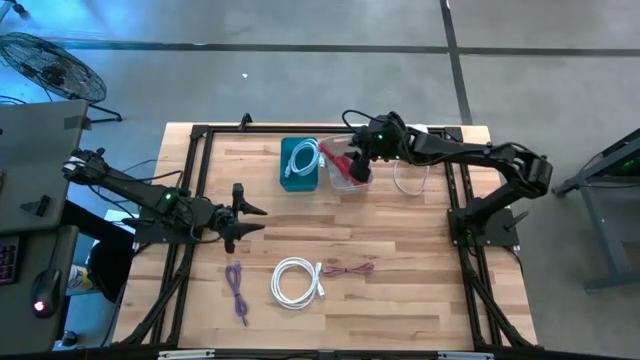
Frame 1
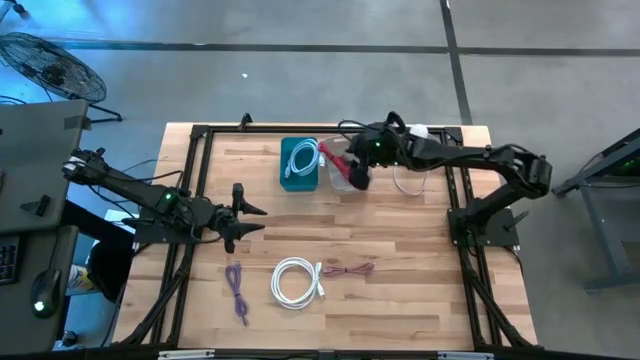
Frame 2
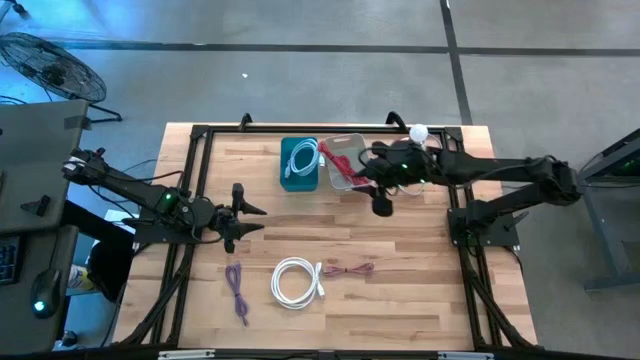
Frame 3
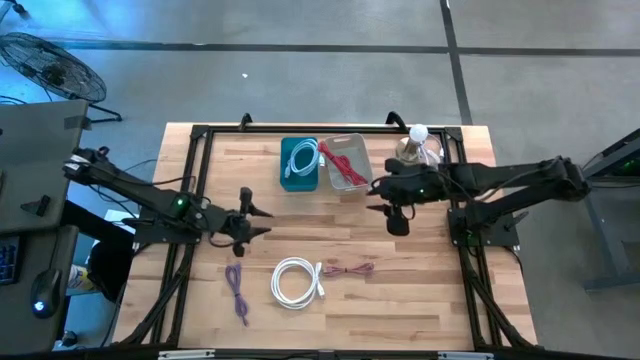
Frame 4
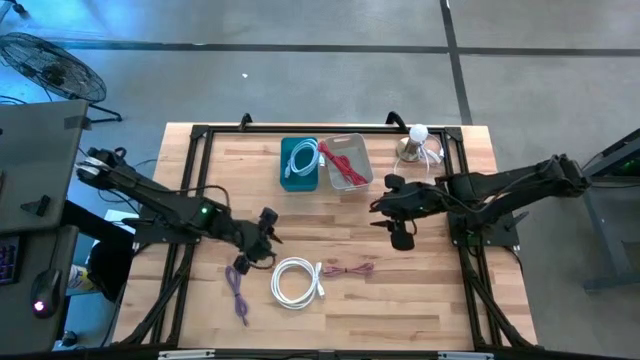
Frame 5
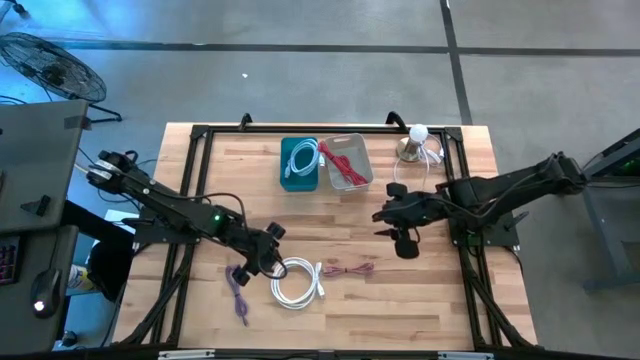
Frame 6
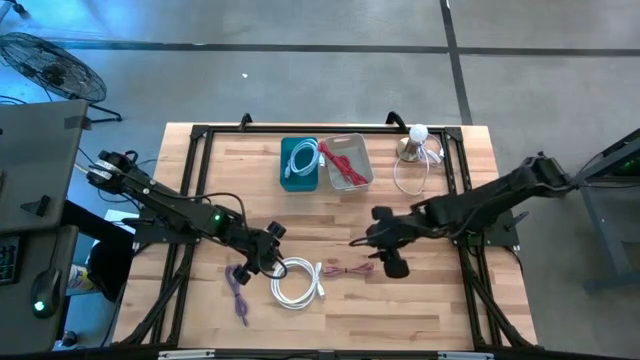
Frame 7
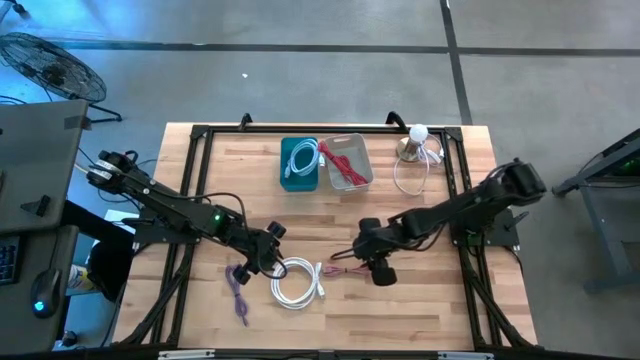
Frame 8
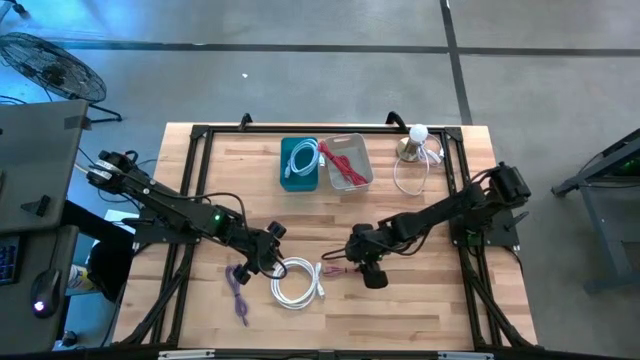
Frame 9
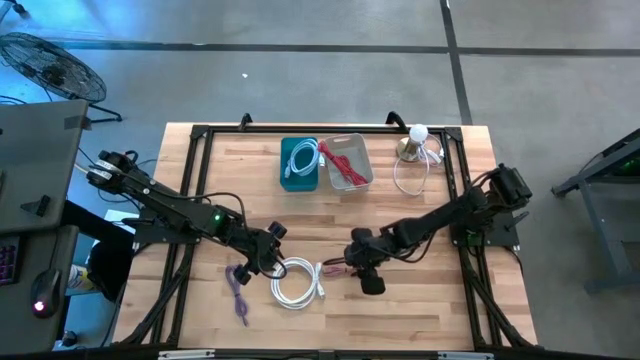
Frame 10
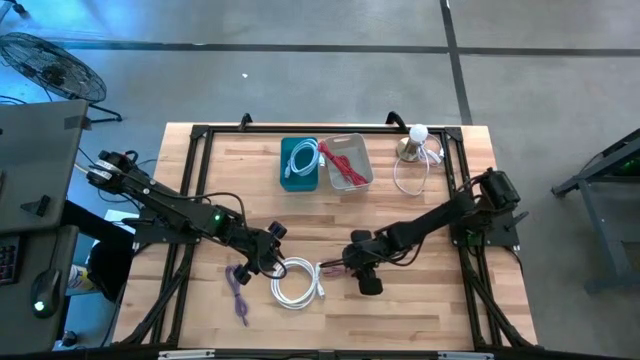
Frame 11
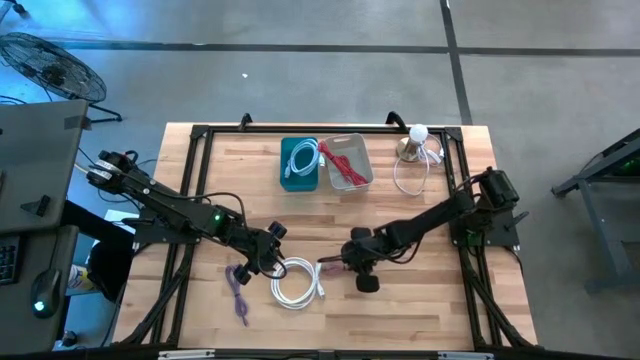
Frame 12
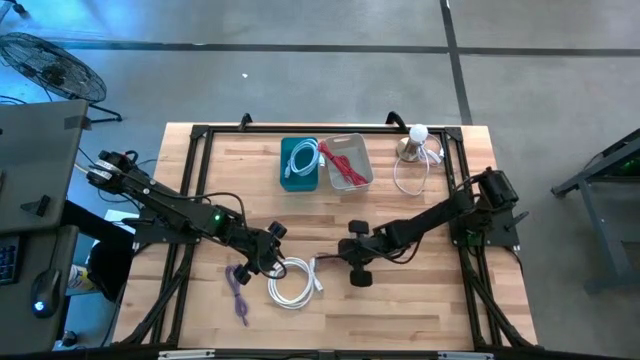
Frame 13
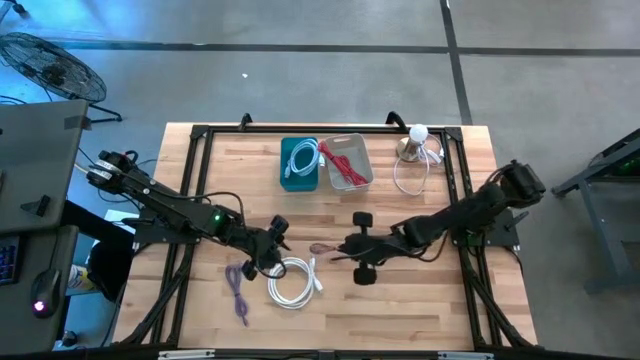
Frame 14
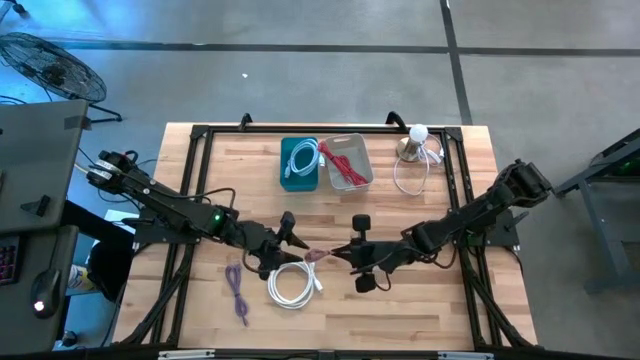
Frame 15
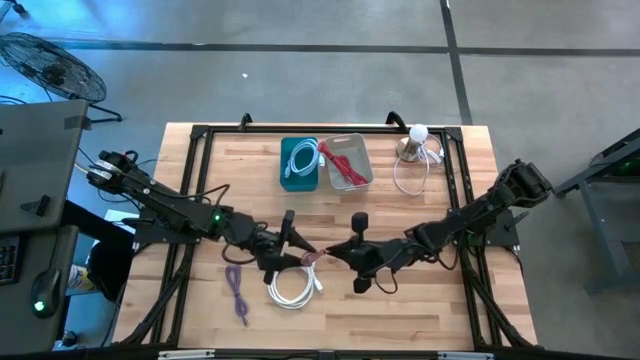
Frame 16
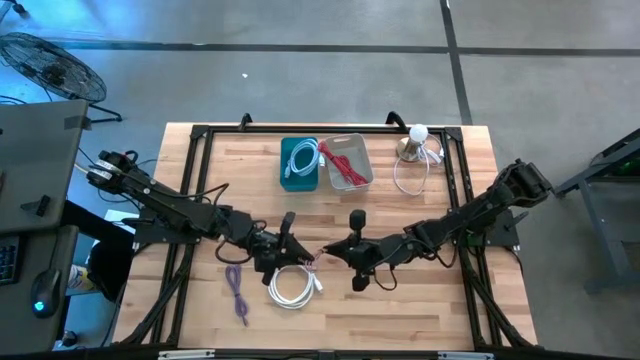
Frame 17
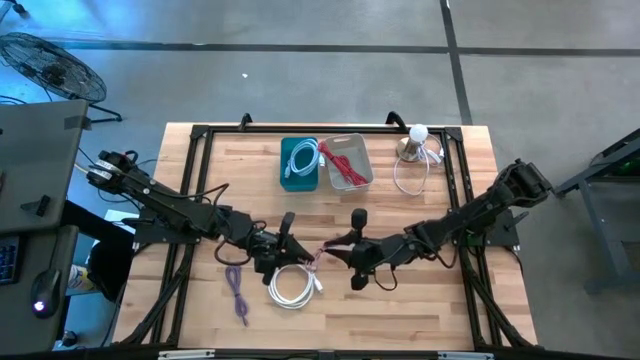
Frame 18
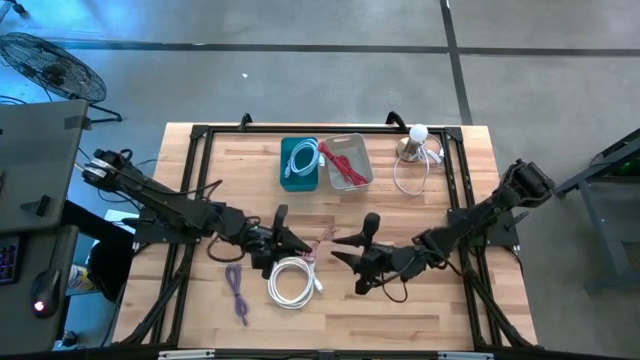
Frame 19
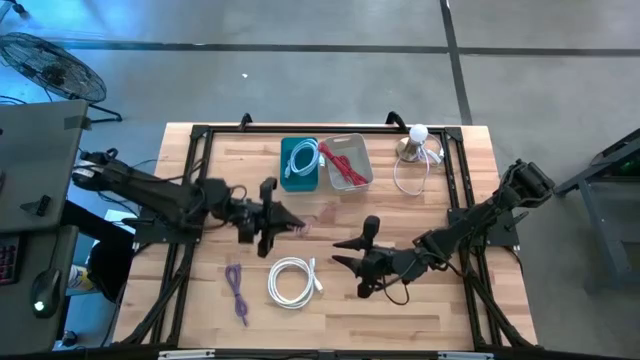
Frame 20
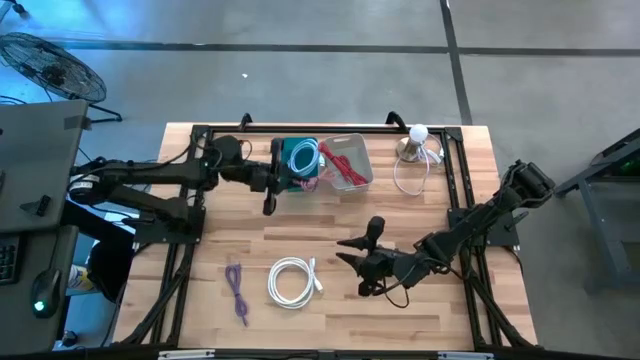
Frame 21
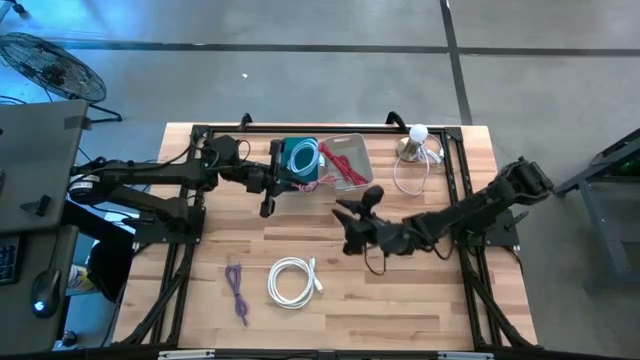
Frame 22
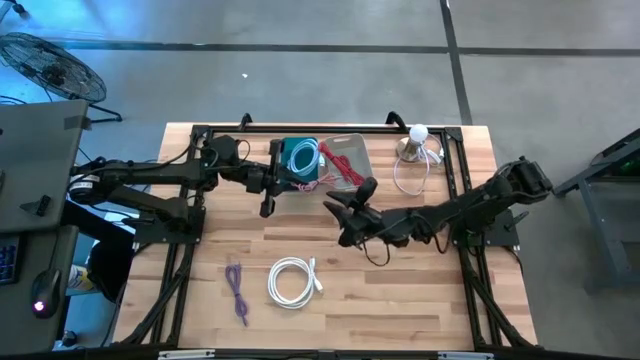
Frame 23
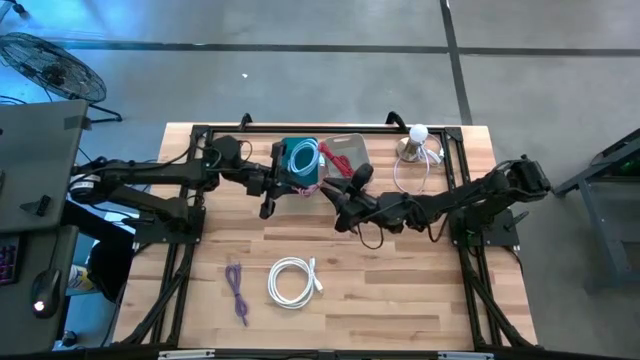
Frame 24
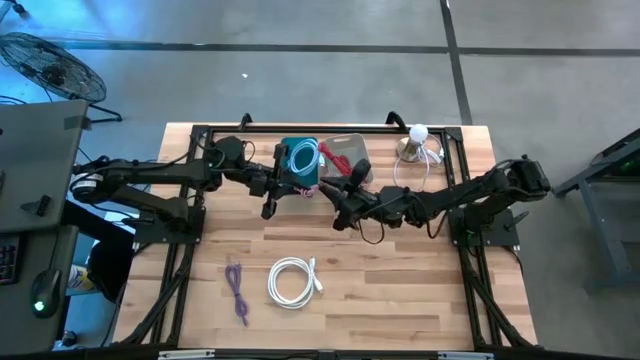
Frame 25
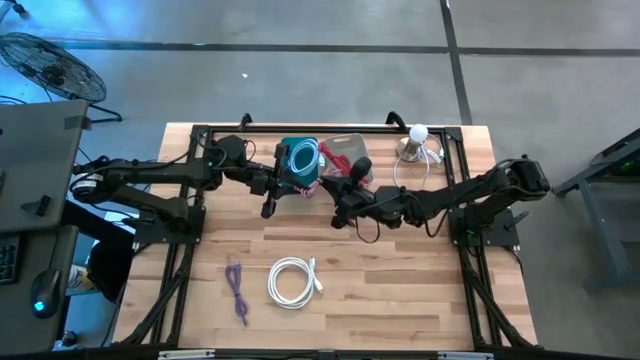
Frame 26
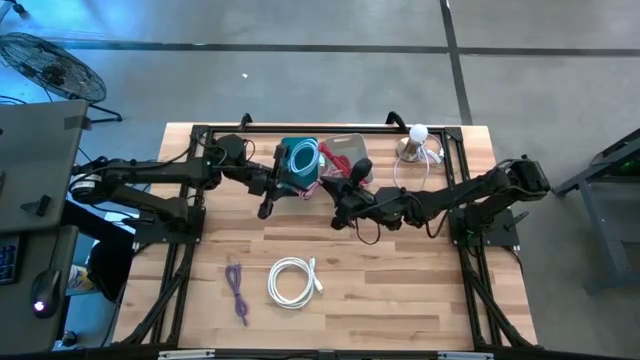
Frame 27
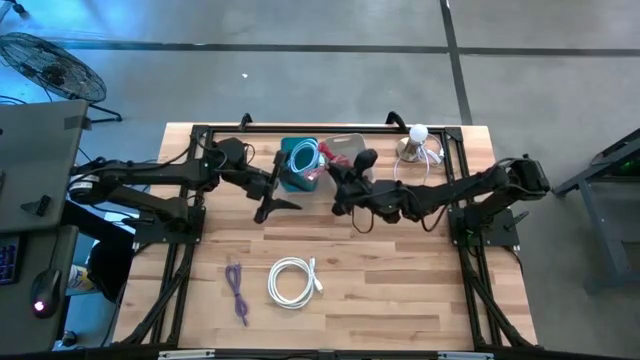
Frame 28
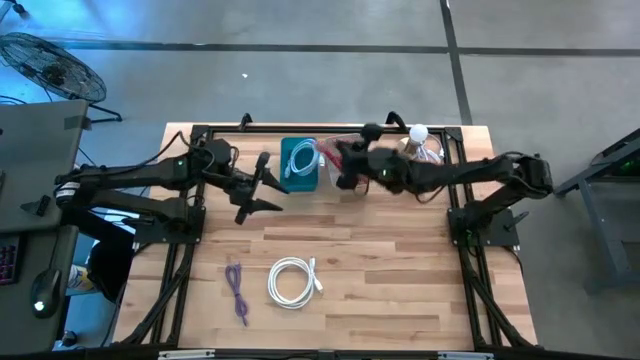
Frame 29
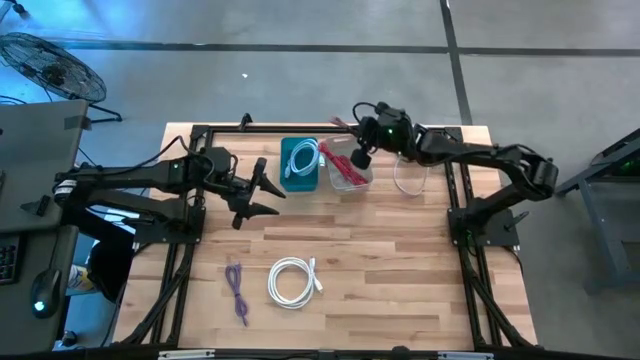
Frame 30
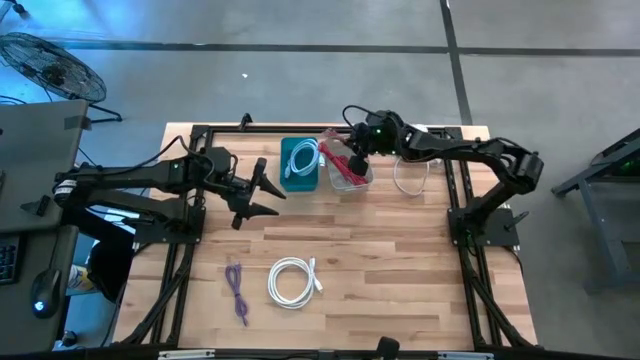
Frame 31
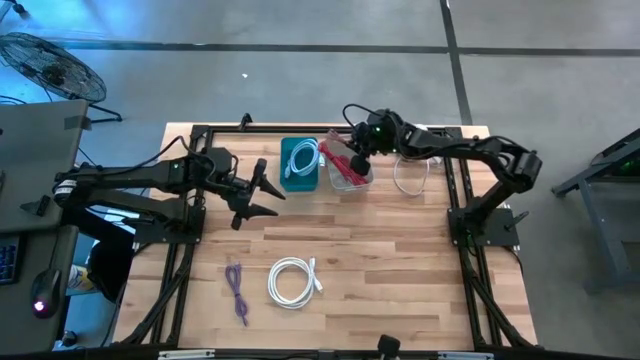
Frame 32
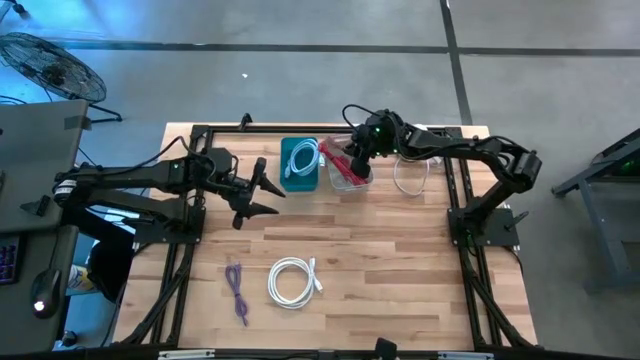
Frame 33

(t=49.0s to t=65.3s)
Task: Pick & Place USB Port
Put the pink charger cable into the gray bin

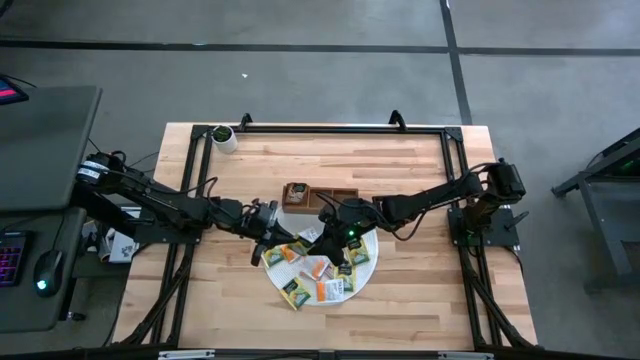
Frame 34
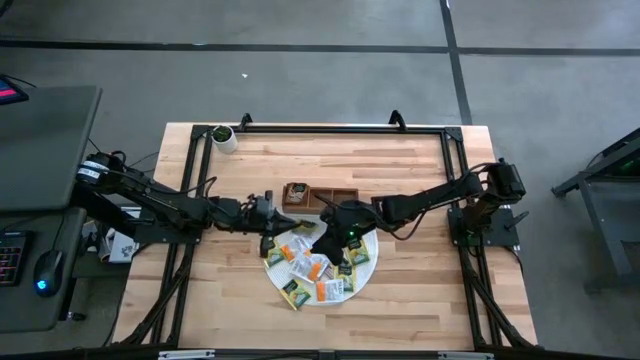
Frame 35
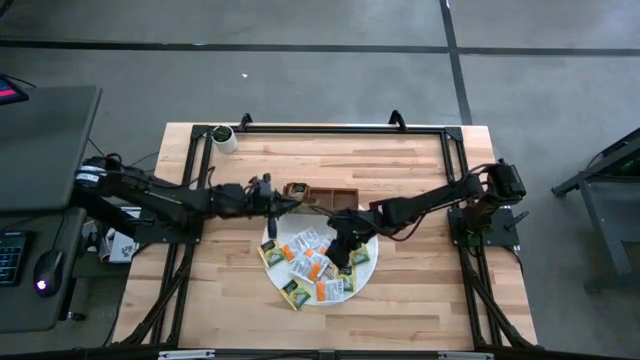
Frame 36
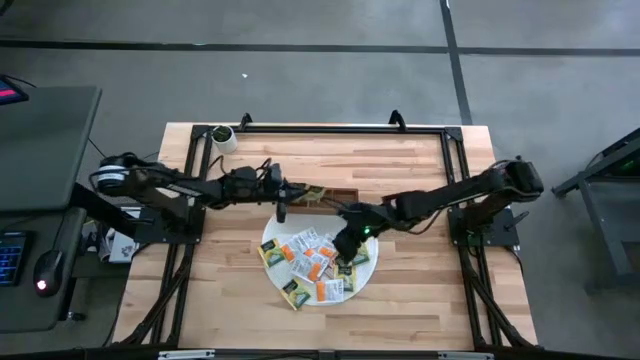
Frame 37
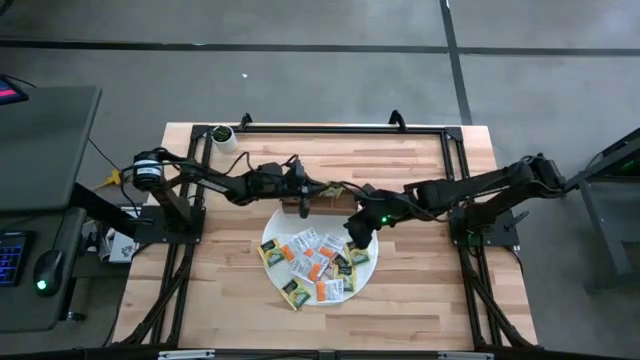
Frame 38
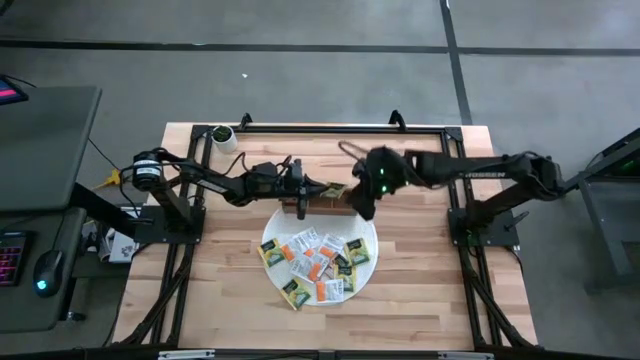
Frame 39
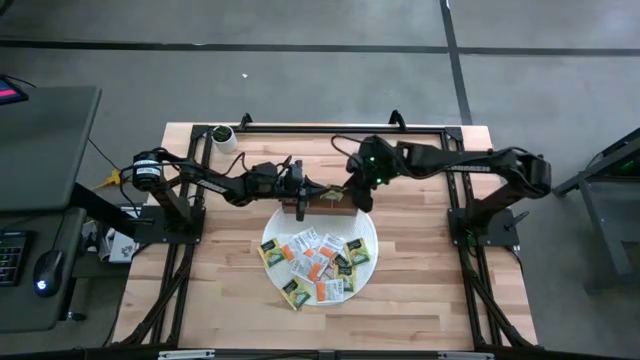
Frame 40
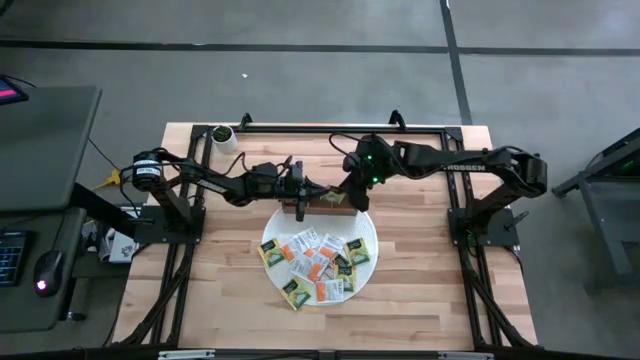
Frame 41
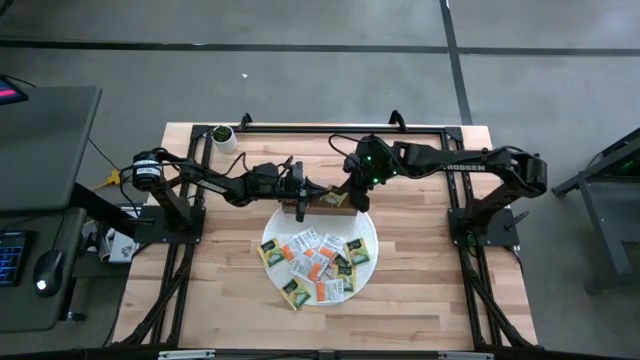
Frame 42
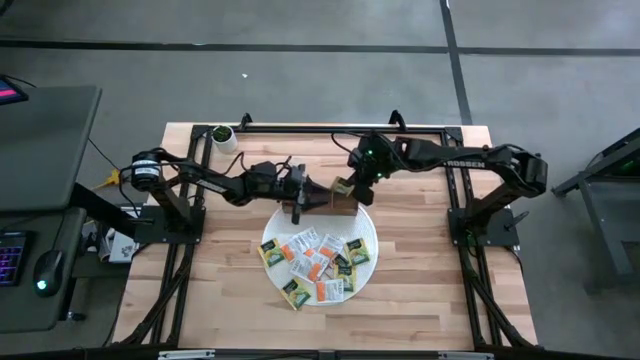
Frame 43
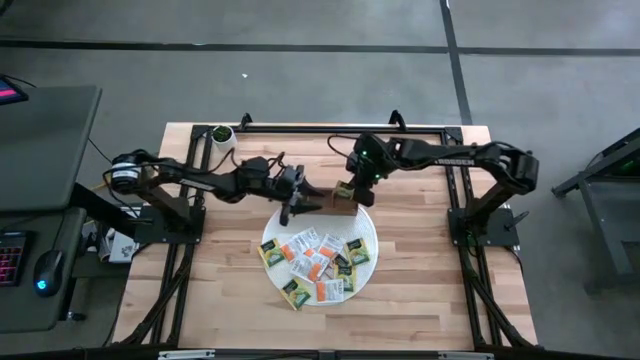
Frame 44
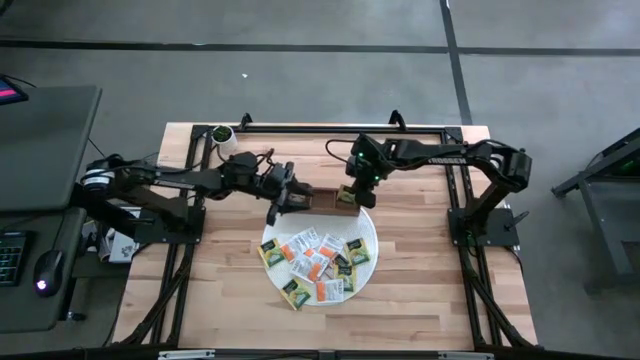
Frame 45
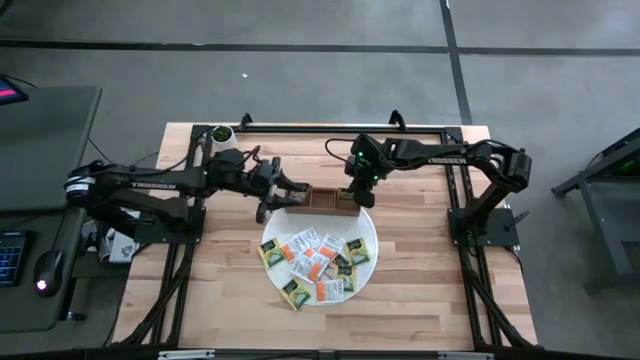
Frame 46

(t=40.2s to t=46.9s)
Task: Pick & Place Tea
Put the yellow tea bag into the right section of the wooden organizer
